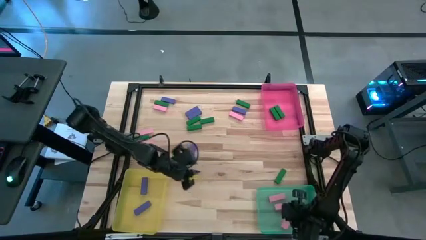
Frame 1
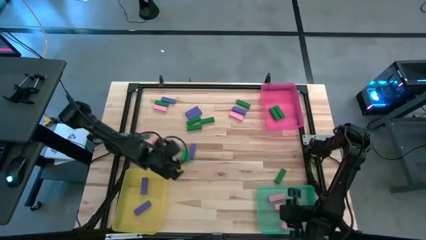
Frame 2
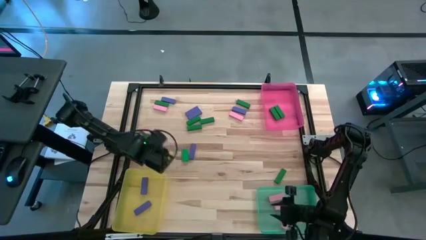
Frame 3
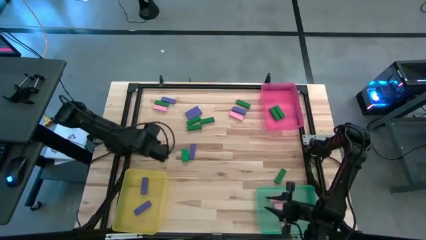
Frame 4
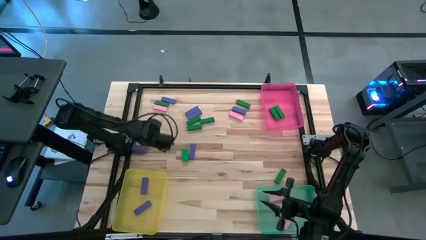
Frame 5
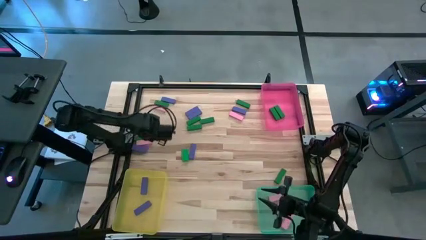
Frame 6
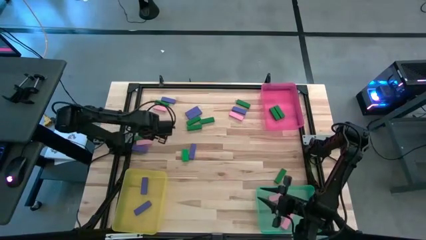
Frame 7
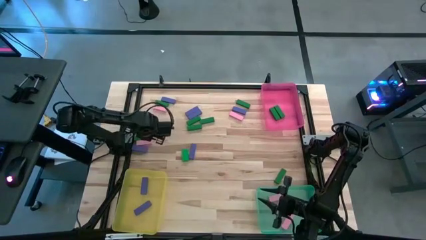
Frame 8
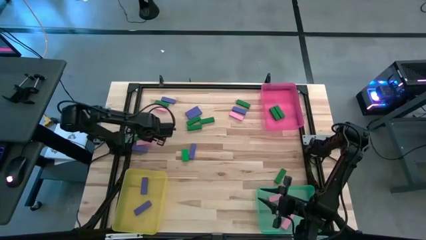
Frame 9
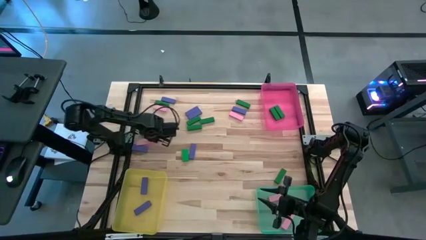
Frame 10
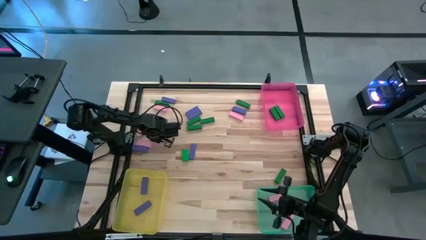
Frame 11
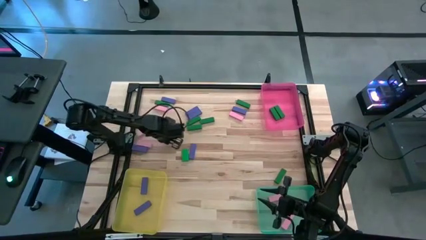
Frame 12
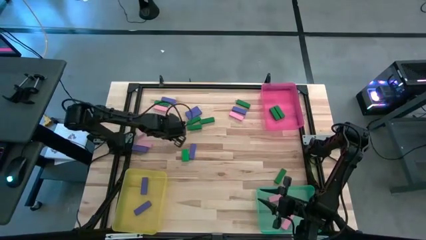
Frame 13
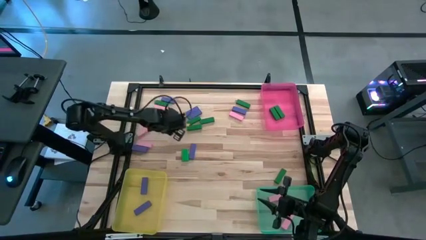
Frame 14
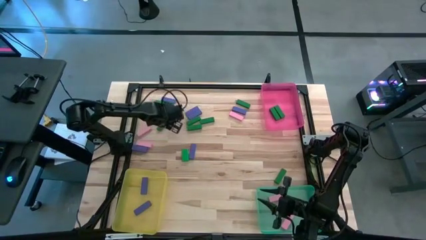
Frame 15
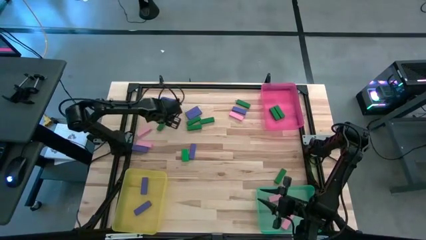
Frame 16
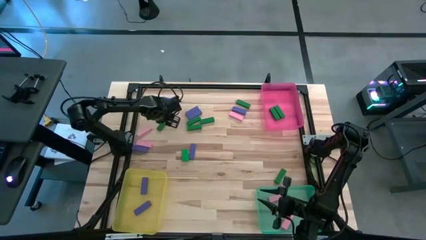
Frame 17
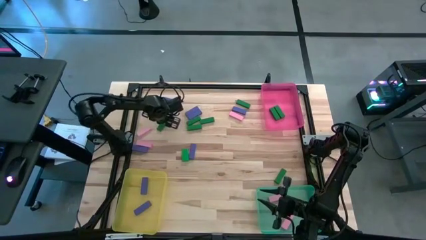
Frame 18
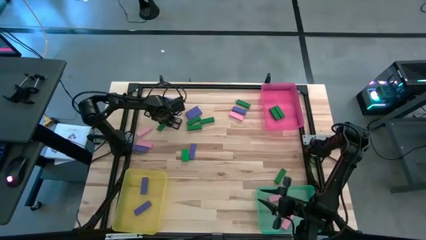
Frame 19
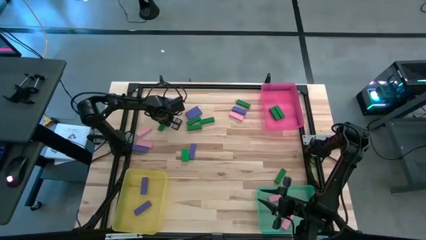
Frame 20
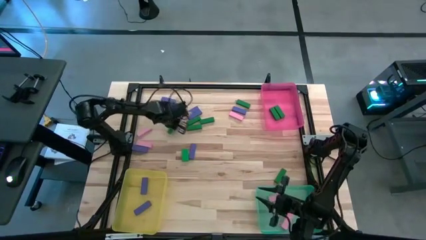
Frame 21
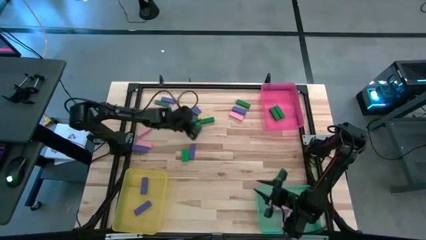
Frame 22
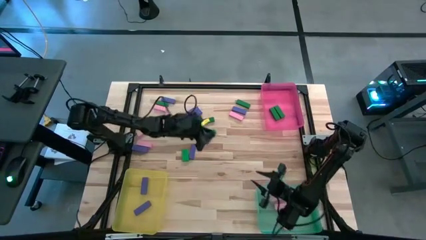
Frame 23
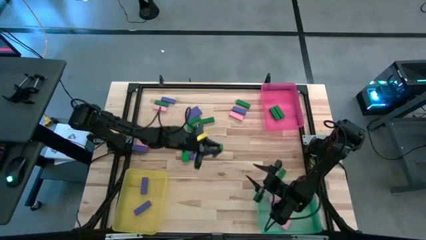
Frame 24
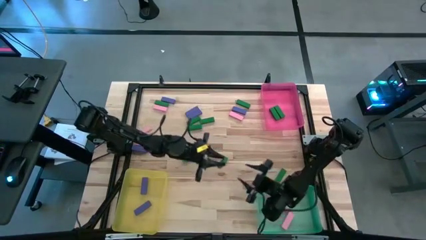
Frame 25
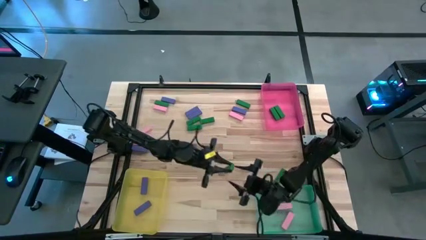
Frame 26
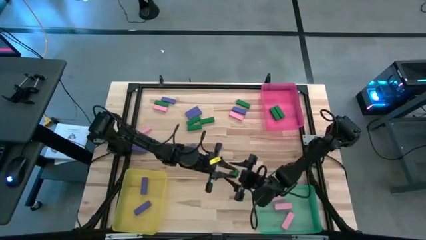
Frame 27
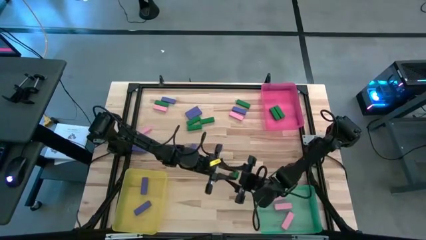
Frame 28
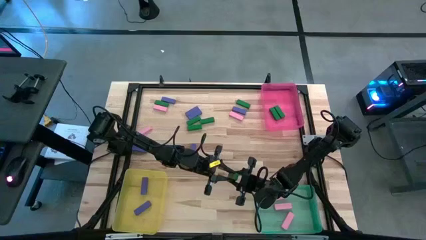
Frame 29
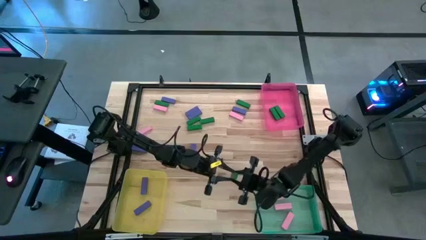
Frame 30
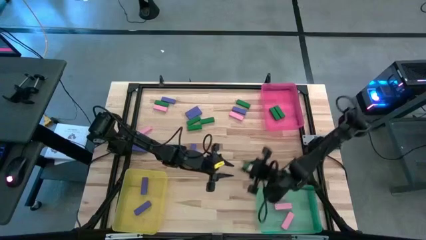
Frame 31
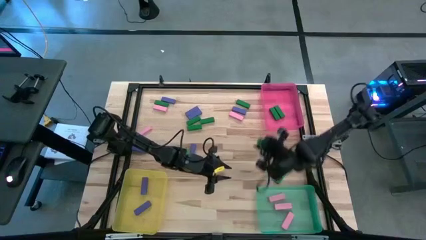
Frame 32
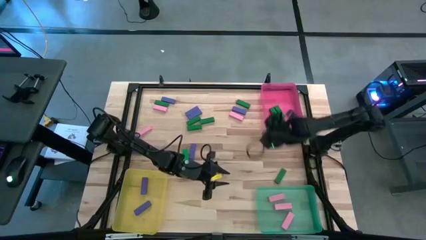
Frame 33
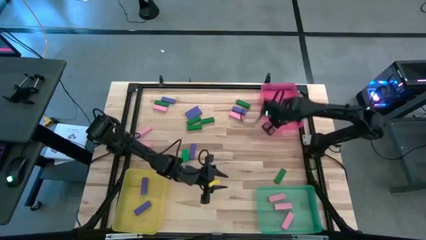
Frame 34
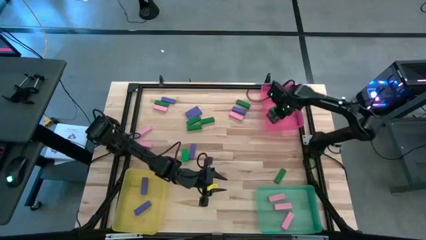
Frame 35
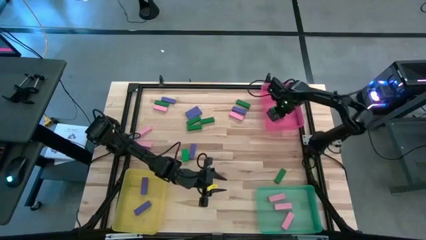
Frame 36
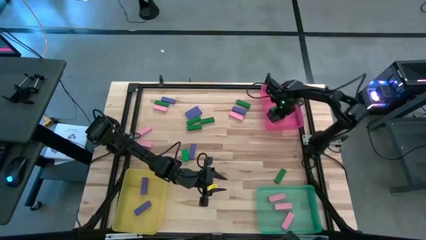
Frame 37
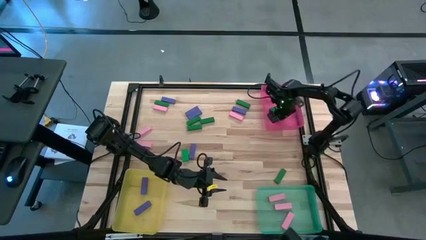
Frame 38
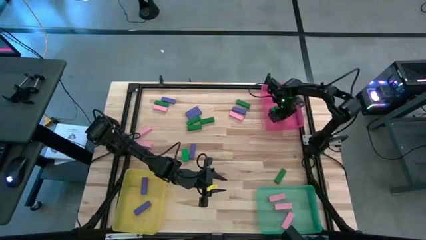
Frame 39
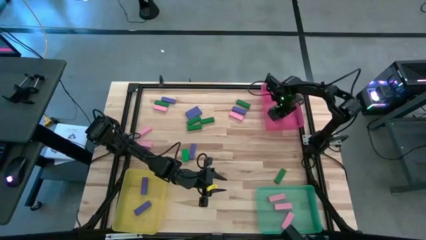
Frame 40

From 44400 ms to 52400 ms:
Task: Sort blocks
Put the green block into the green bin

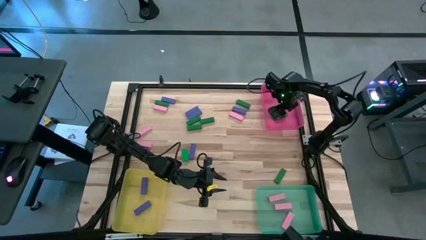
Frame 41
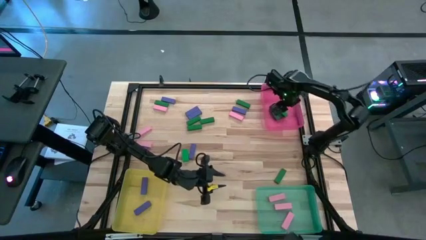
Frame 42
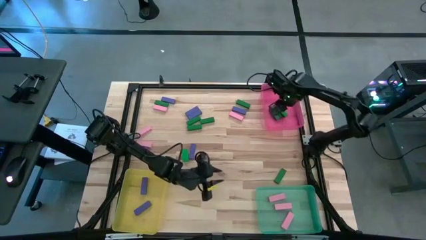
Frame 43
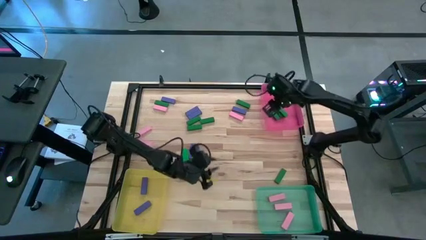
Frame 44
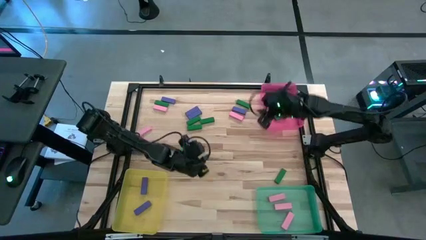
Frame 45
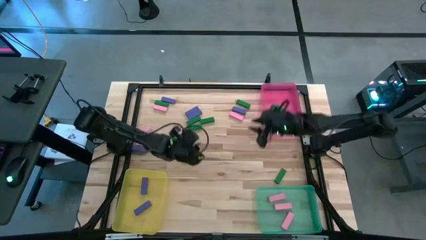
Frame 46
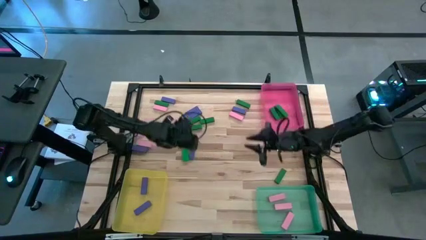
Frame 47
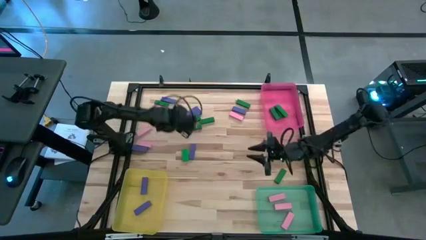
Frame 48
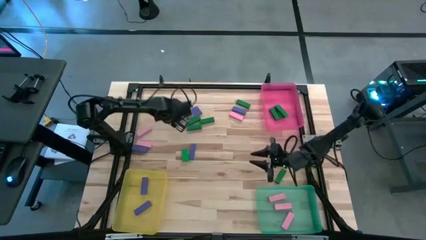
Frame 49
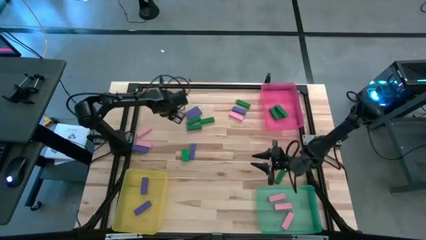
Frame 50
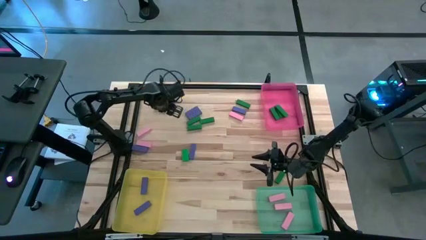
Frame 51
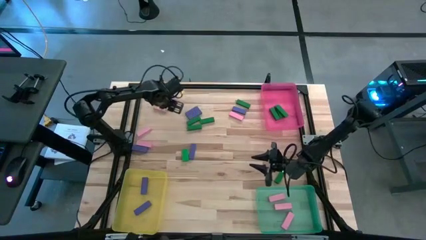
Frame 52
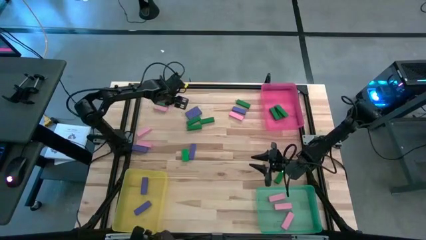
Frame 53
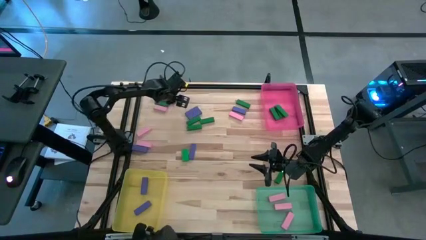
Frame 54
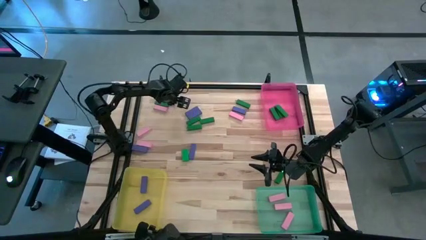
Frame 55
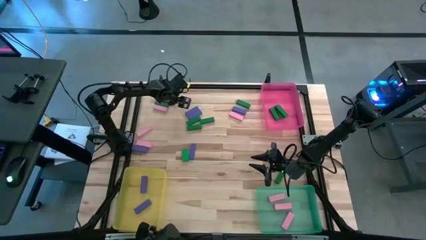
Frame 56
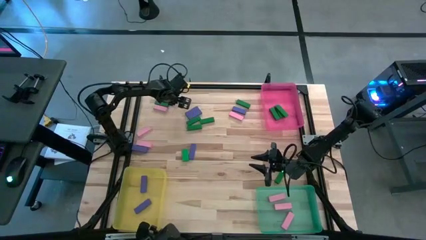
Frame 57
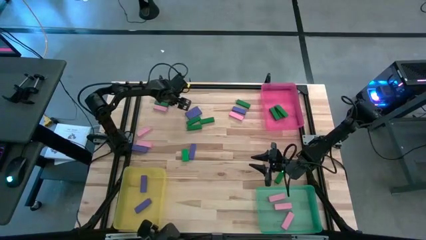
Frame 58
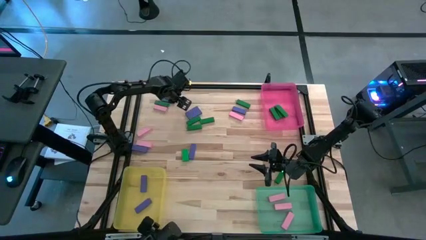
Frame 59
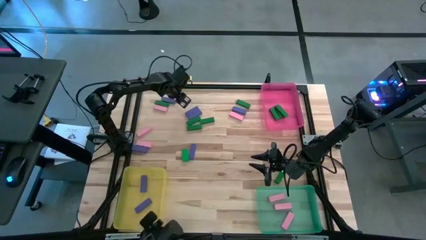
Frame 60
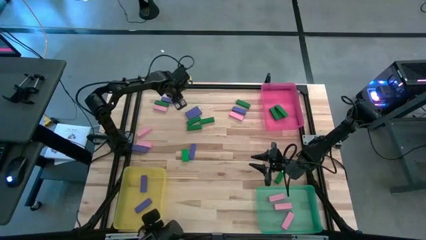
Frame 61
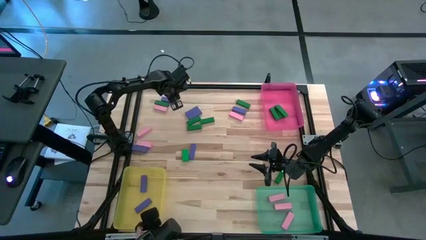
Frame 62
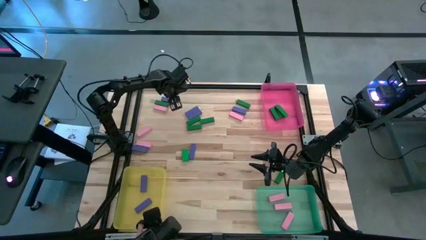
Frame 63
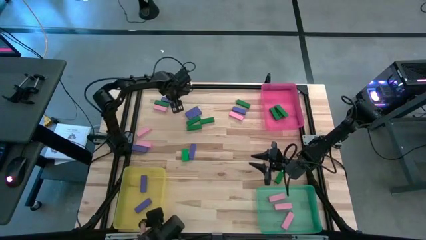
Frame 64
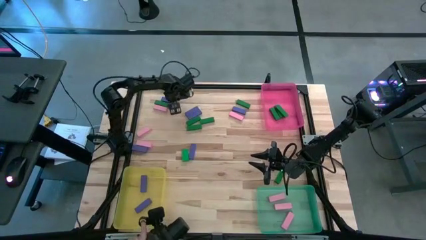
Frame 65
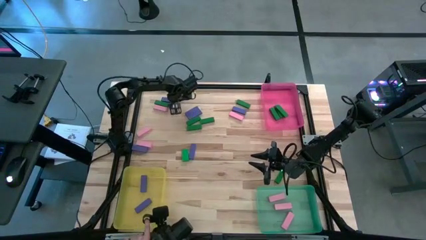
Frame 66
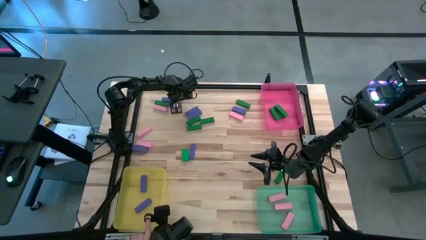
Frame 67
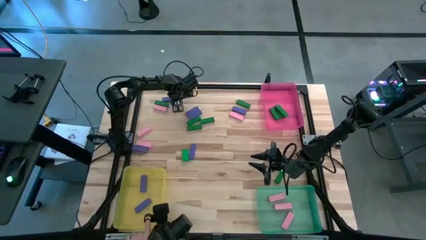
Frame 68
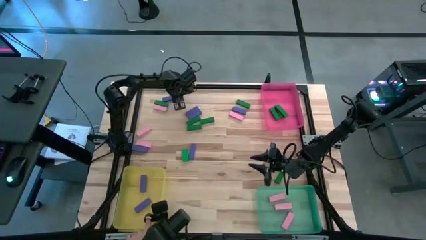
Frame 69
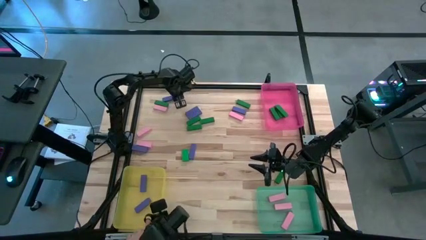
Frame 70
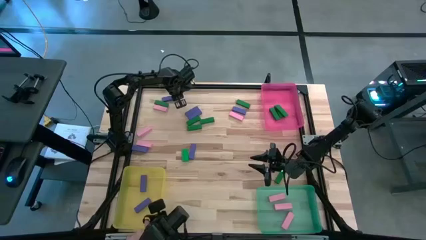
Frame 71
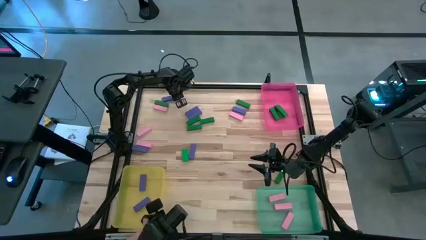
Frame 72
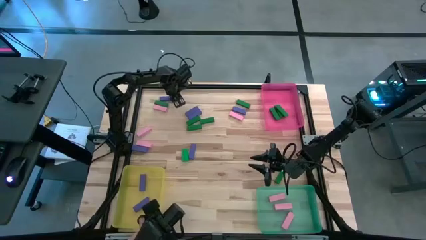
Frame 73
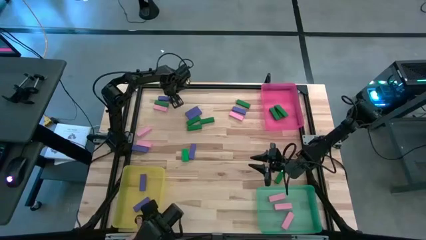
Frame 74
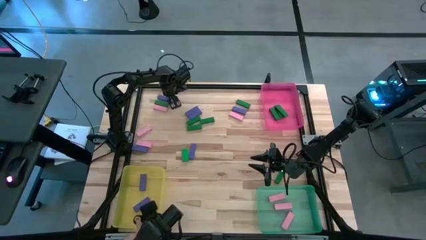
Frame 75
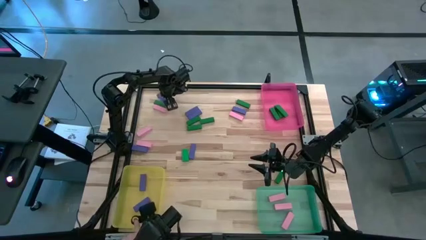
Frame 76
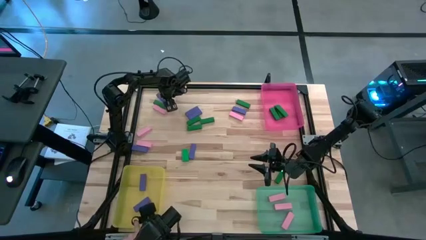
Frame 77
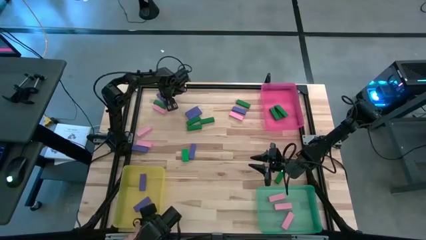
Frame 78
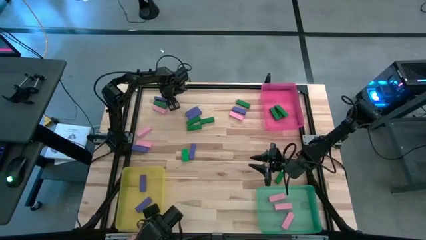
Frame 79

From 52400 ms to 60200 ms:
Put the blue block into the yellow bin

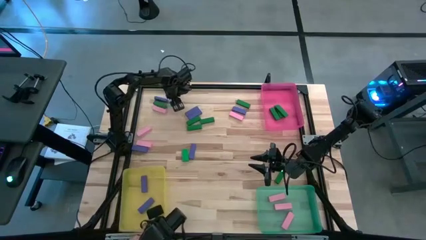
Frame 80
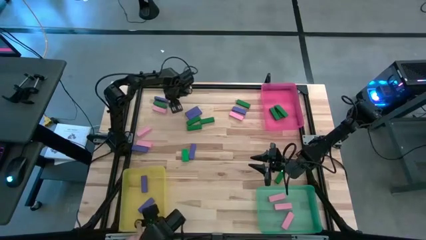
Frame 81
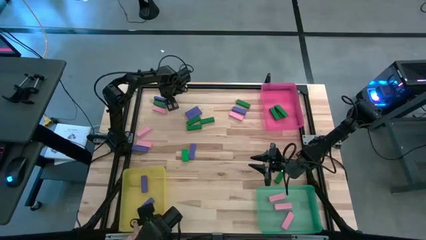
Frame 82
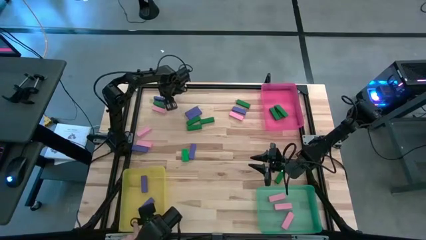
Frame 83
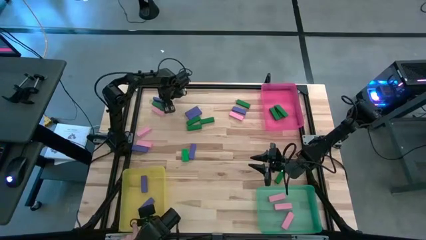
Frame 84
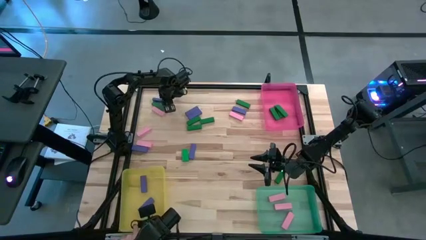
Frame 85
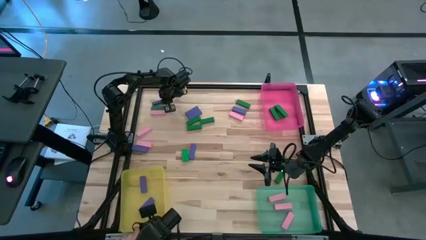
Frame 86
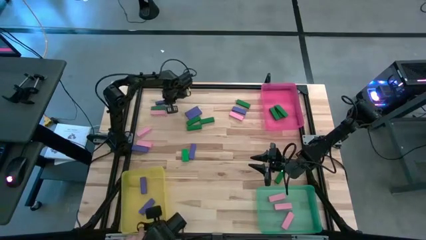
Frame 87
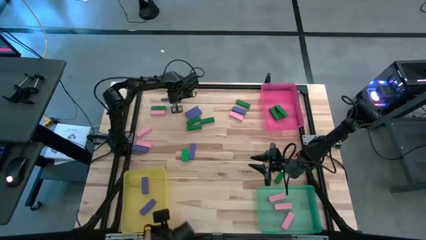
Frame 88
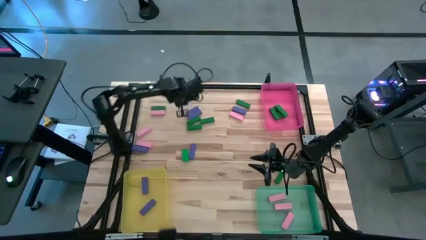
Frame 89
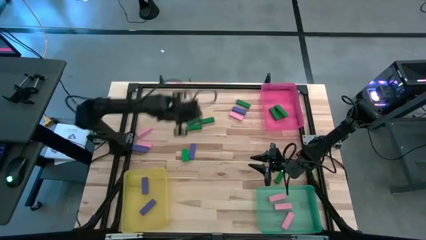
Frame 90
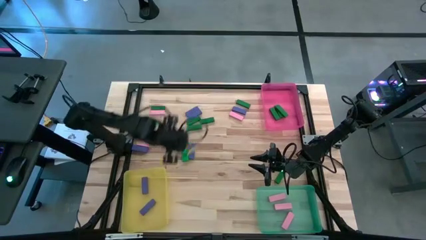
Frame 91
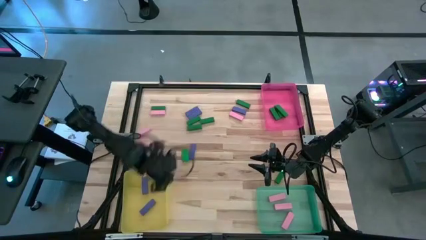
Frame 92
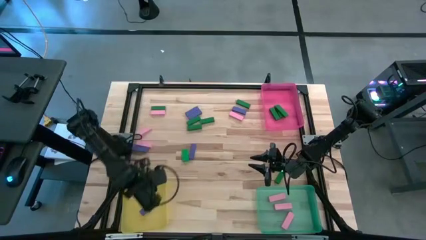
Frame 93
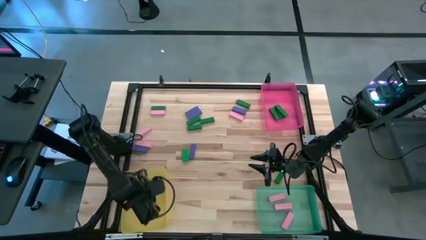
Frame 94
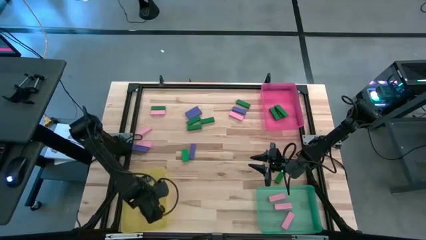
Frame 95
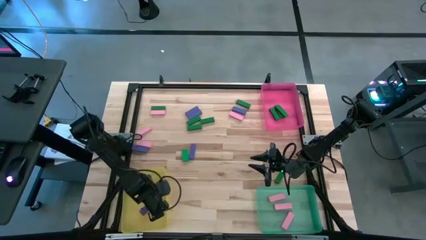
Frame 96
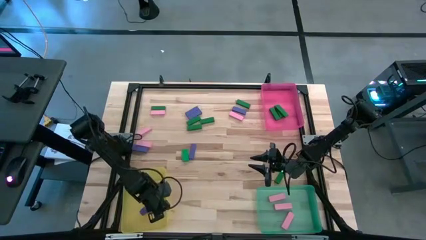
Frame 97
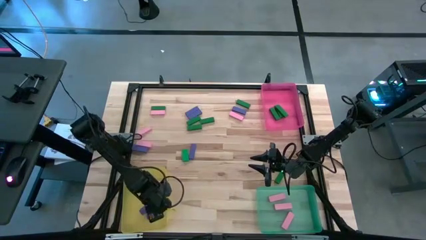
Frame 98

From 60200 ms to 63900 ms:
Put the blue block into the yellow bin
